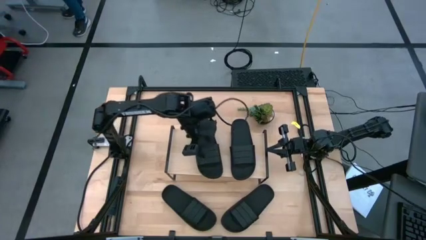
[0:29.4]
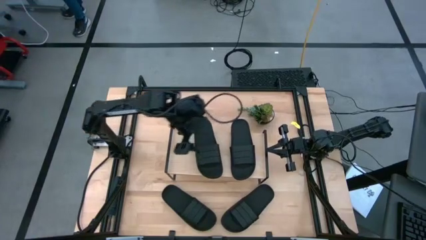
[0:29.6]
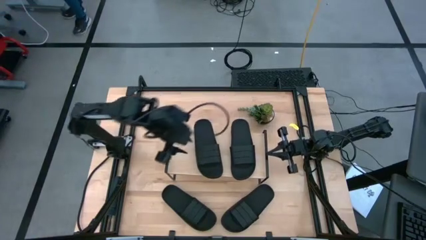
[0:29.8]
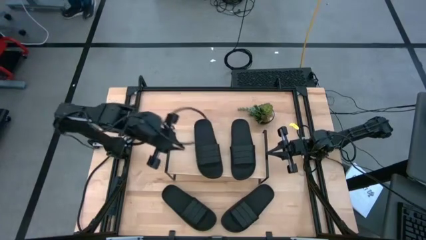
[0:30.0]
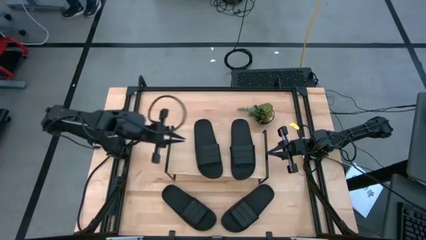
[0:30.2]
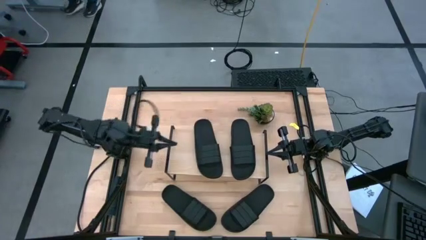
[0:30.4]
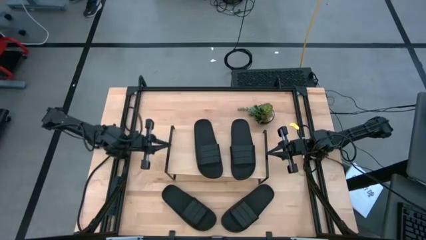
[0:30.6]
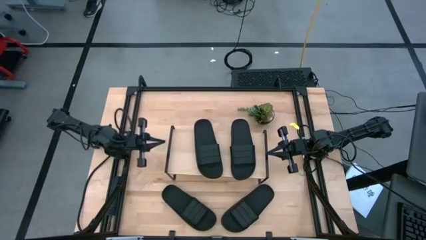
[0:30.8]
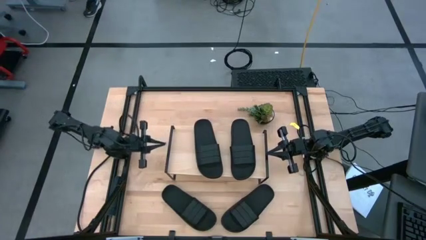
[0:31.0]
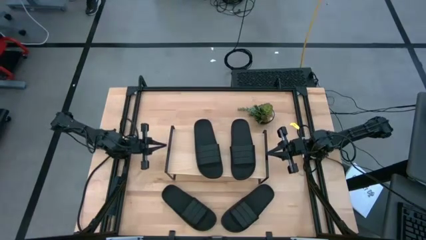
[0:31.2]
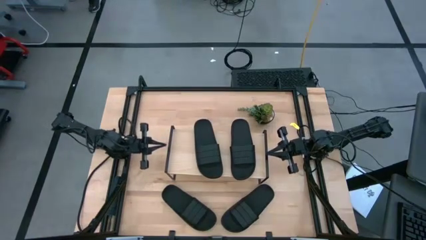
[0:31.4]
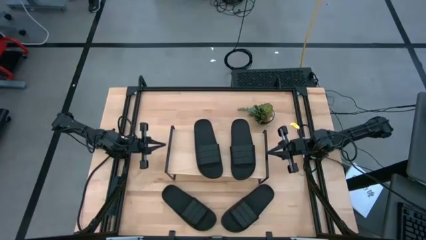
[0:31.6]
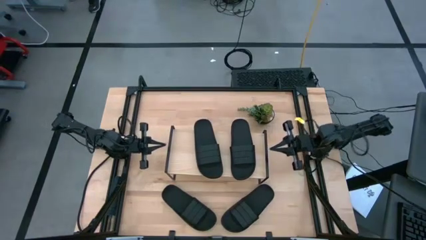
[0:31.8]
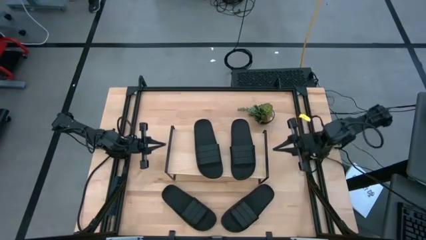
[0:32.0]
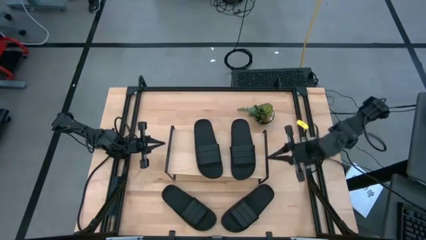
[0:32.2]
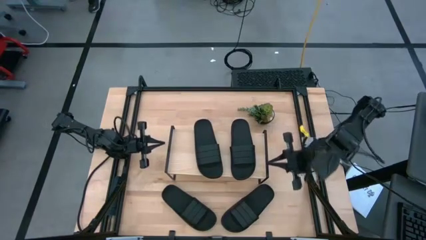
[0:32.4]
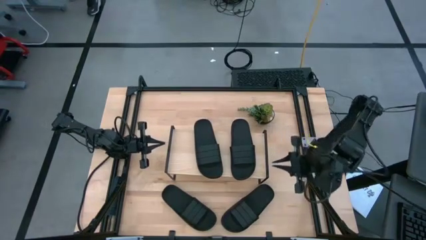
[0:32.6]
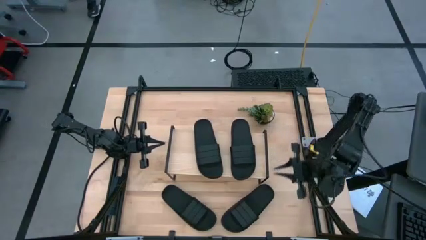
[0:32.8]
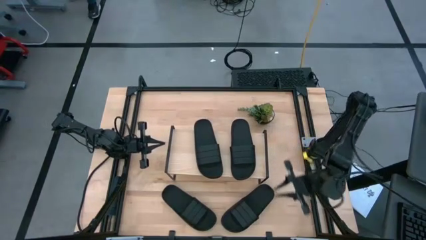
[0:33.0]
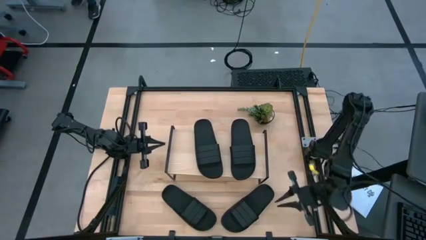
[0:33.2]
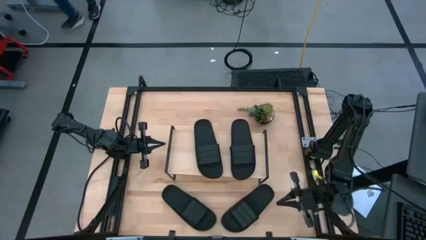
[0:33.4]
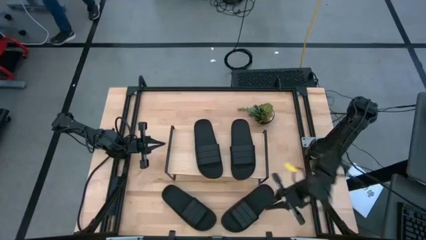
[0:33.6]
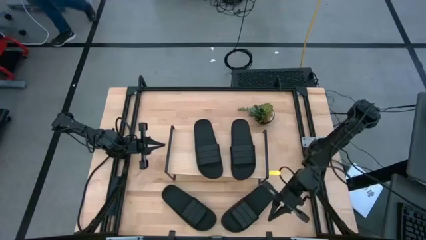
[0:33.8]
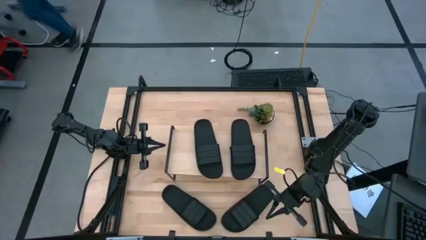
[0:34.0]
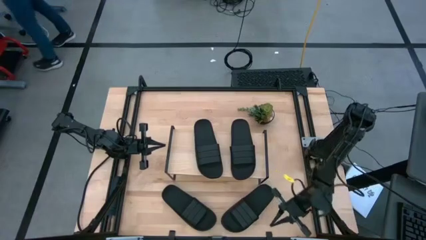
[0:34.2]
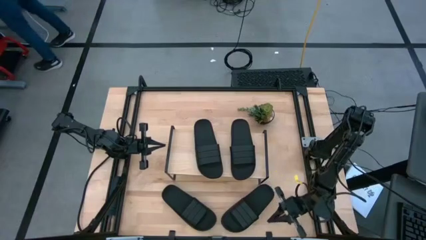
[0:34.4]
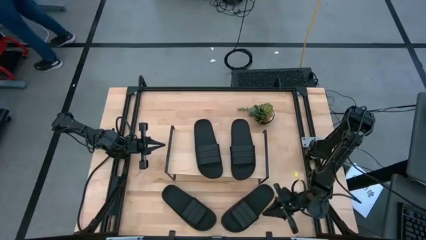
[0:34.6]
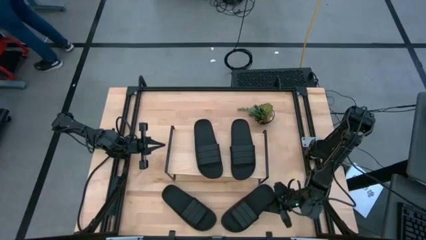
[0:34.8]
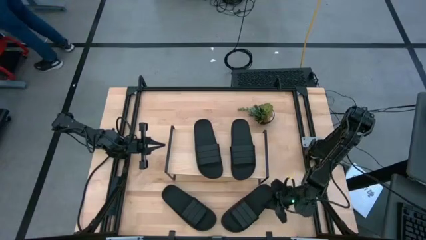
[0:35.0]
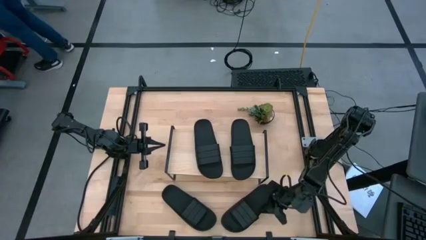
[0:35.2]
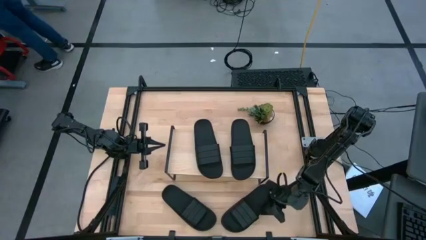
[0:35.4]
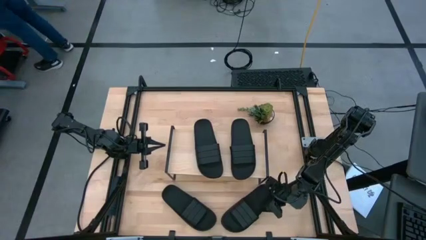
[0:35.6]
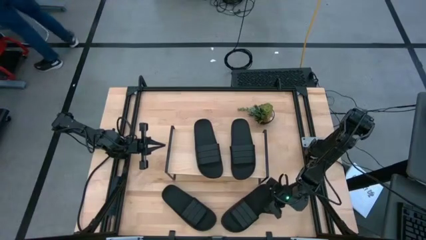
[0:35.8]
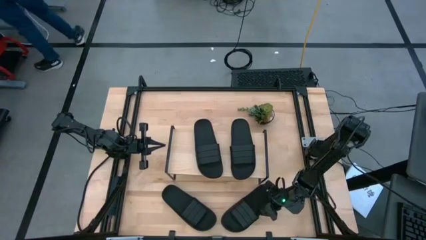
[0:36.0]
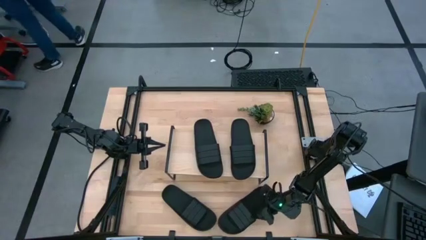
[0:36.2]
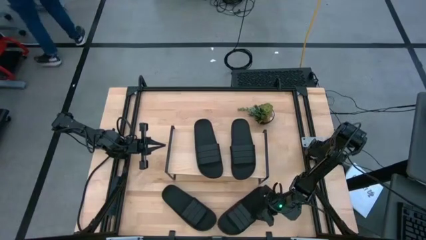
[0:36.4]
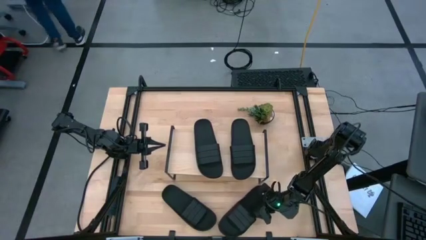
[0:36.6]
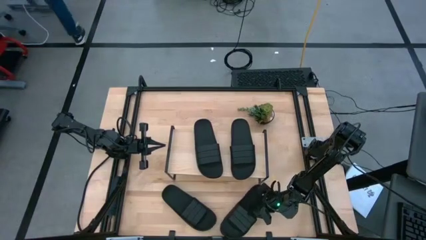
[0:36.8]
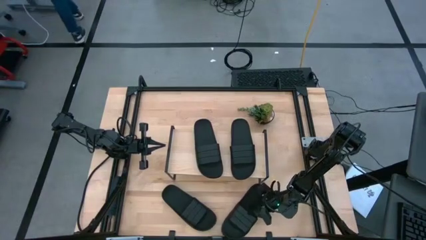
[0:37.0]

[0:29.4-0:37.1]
Task: Pick and place slides into the shelf
Adjust the black slide

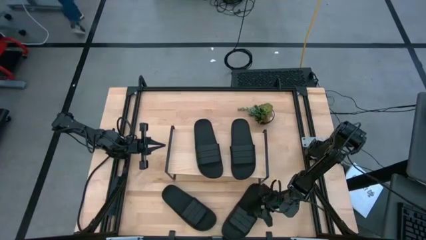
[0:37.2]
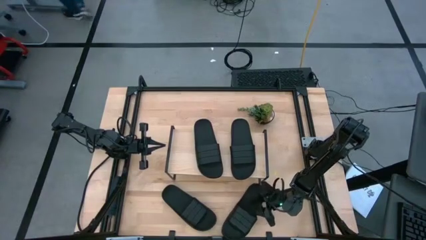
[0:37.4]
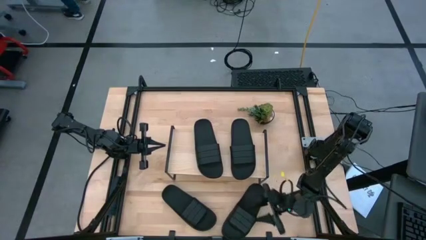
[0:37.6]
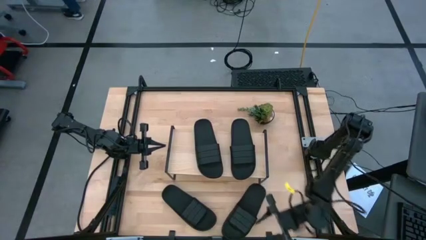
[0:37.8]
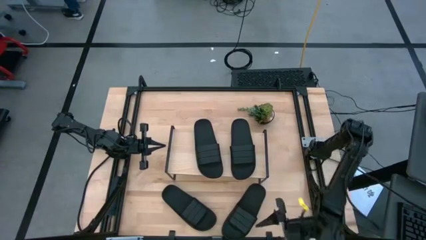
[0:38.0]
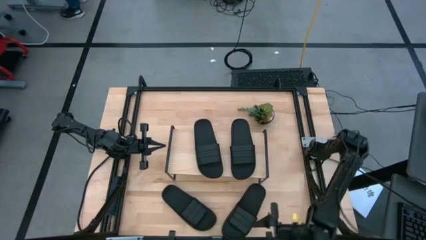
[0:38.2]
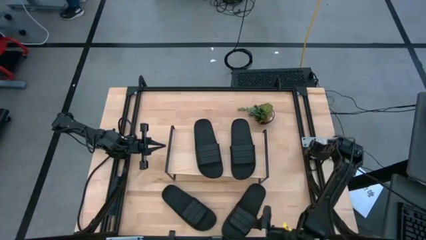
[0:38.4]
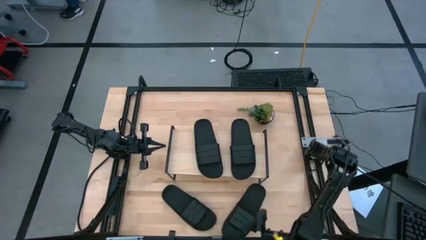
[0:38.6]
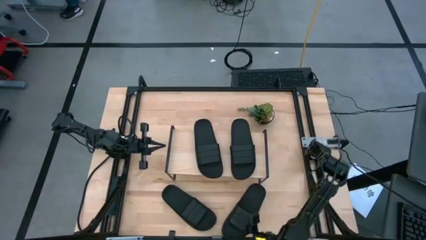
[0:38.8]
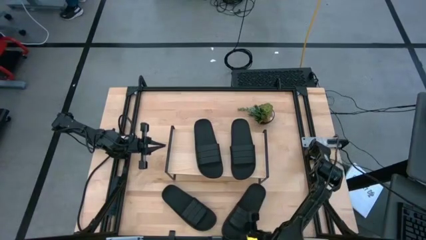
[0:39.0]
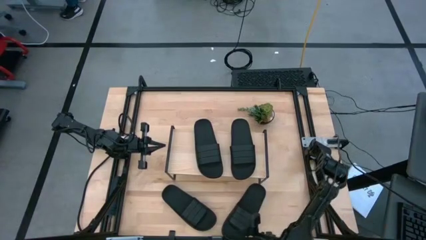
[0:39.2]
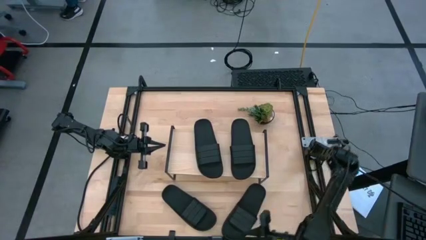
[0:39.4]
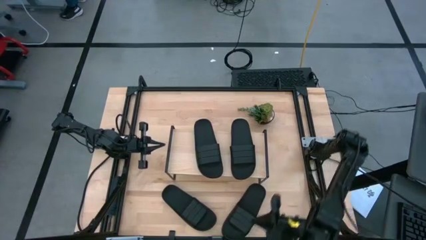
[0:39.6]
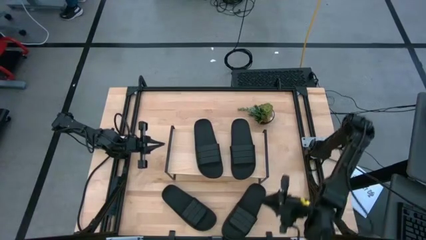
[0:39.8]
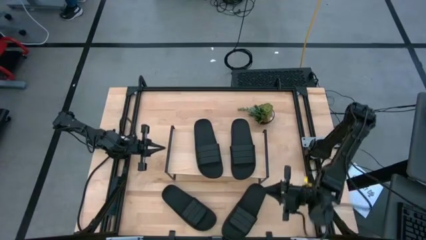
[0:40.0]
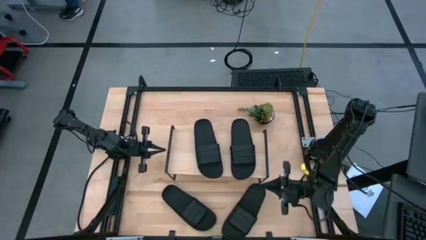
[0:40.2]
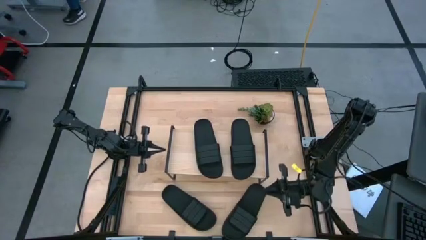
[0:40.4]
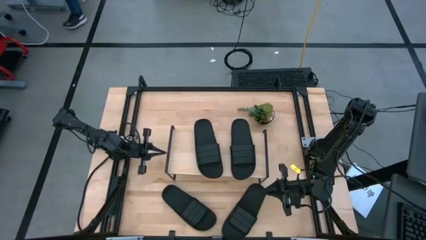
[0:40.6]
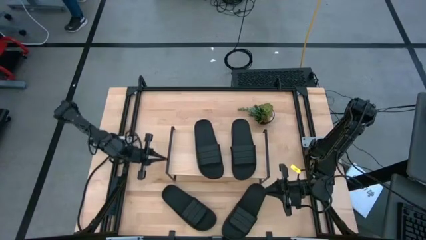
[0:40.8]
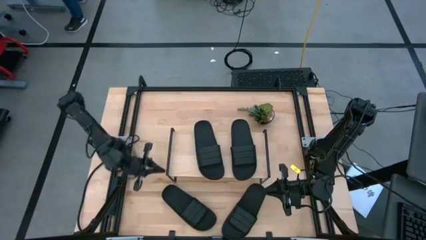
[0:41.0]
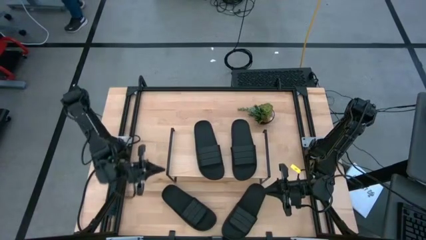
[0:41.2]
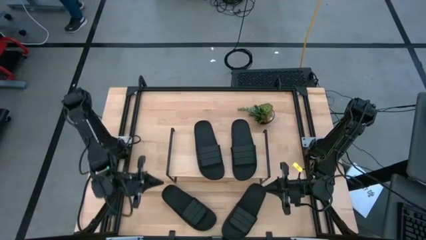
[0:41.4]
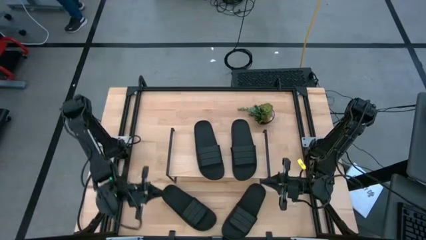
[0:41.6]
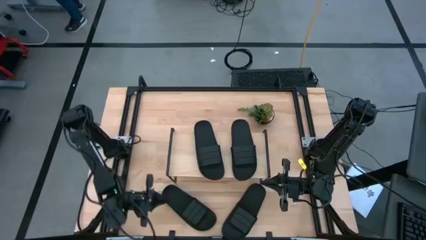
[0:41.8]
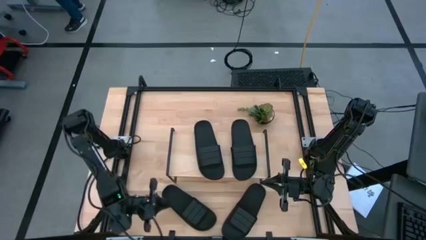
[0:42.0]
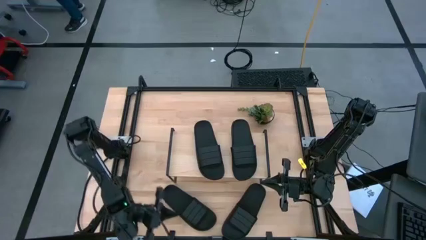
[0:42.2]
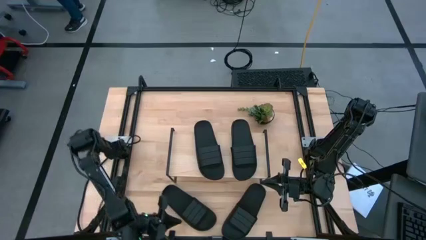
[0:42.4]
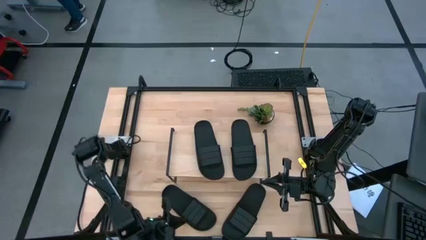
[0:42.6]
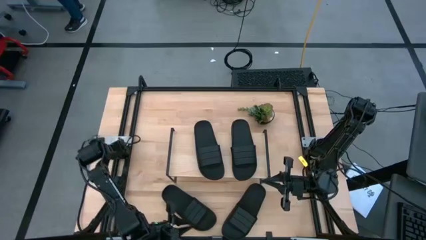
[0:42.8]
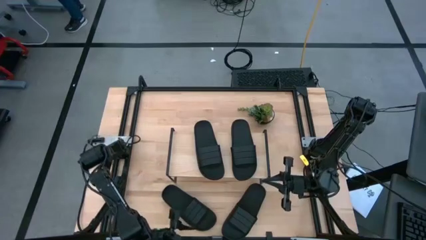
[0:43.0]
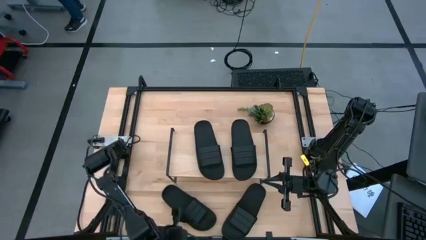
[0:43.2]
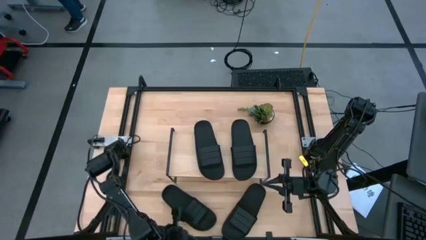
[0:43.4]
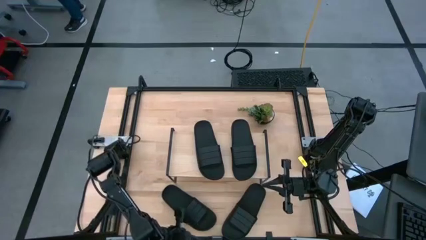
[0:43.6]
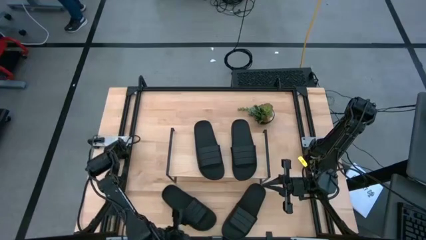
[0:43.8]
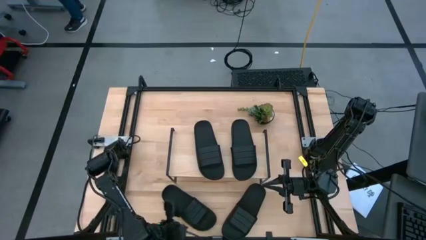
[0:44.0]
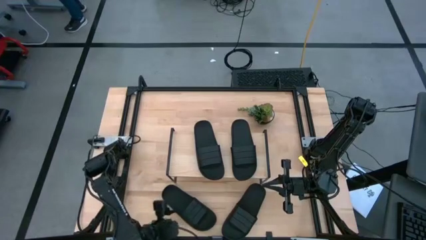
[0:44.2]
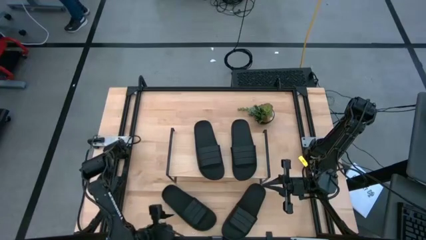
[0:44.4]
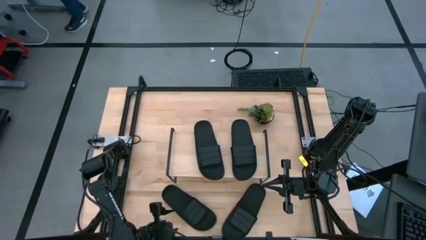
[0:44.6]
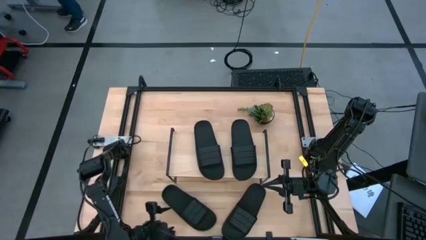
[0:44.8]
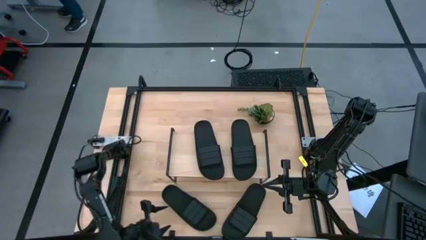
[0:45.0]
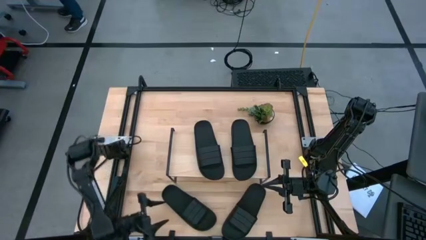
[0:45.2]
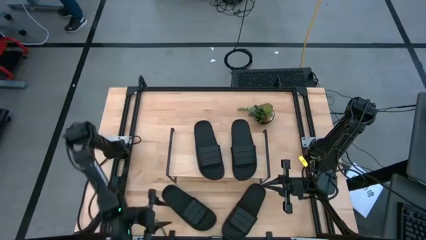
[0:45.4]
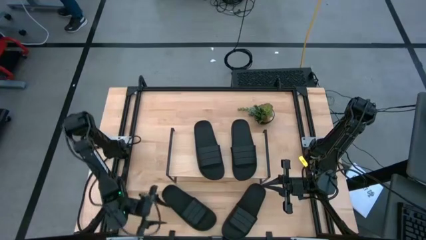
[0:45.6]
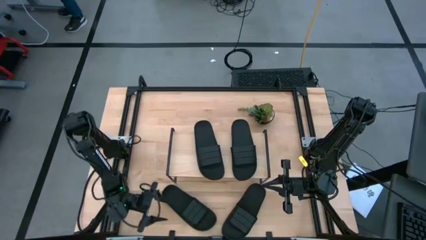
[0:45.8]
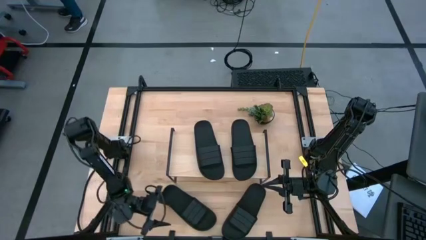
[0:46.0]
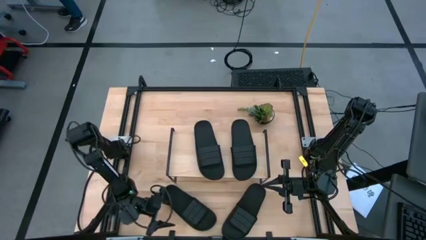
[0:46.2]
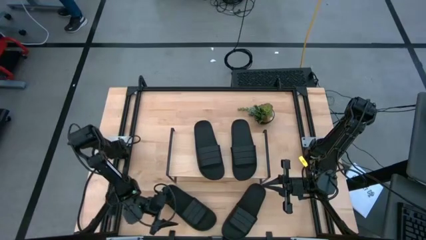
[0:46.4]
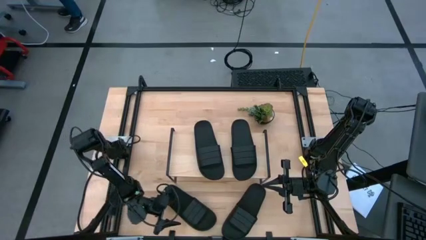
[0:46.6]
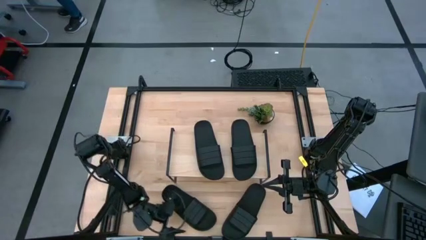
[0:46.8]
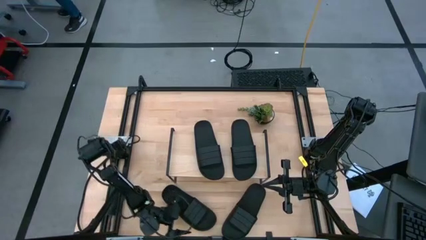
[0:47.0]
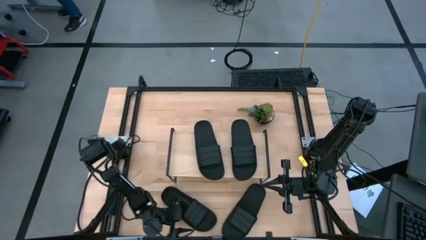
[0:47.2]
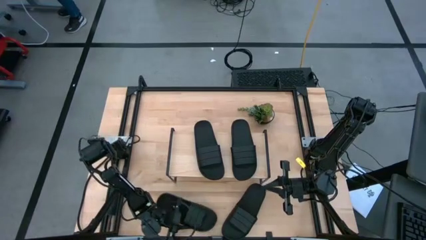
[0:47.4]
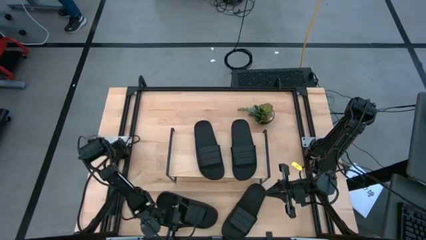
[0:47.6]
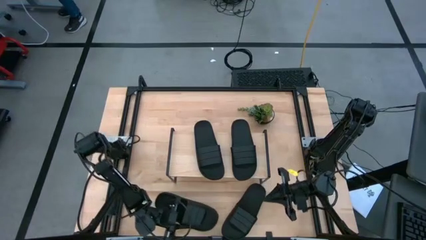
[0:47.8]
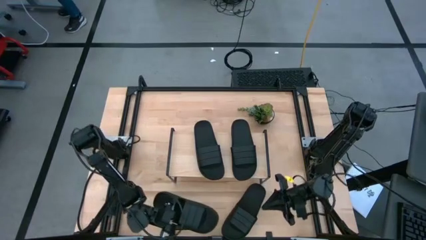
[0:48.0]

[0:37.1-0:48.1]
Put the black slide under the shelf
